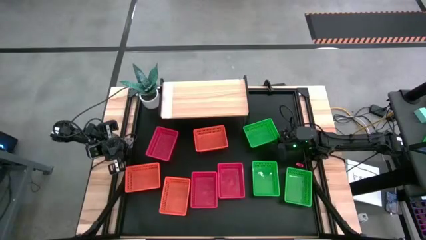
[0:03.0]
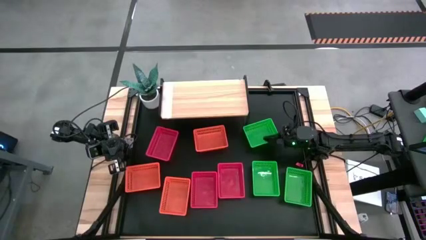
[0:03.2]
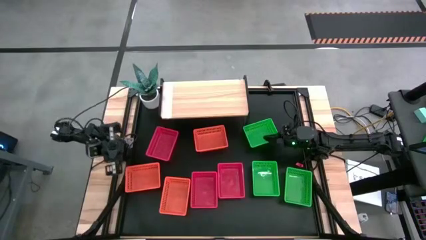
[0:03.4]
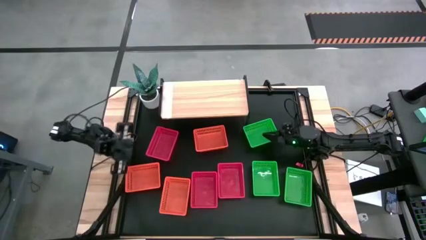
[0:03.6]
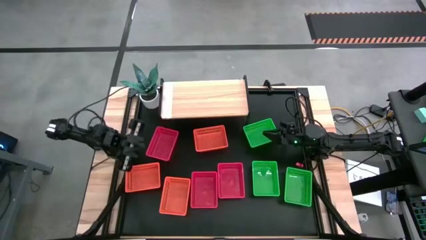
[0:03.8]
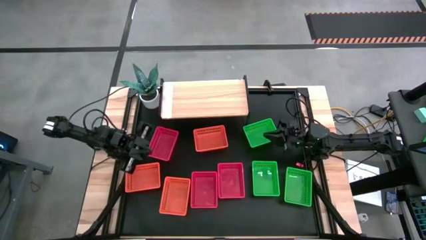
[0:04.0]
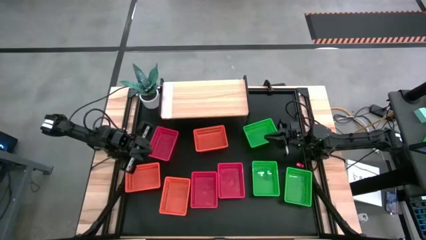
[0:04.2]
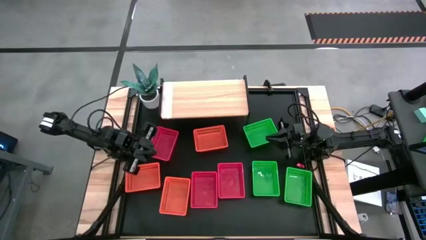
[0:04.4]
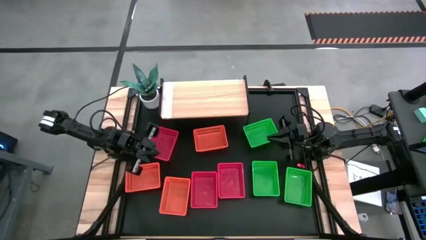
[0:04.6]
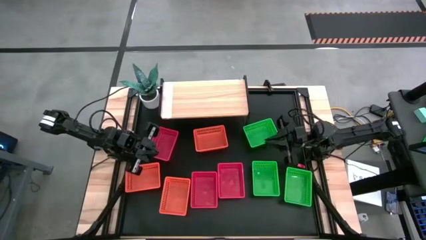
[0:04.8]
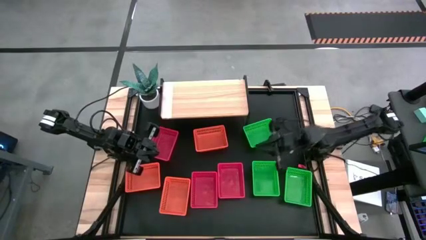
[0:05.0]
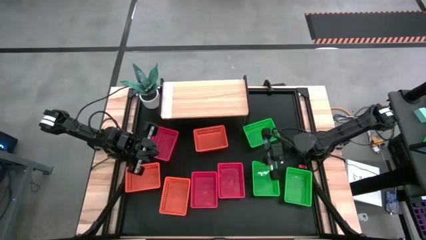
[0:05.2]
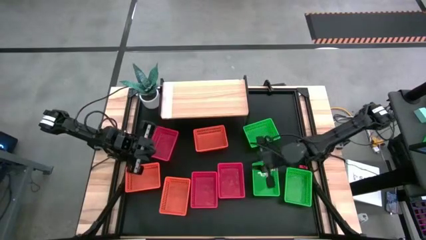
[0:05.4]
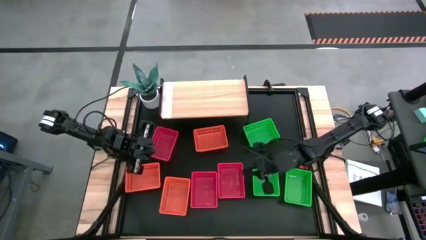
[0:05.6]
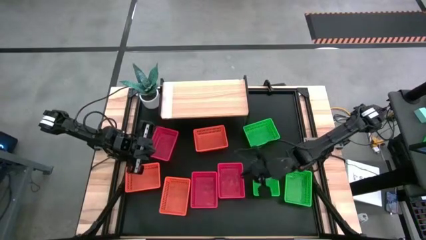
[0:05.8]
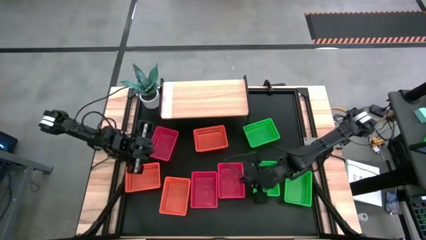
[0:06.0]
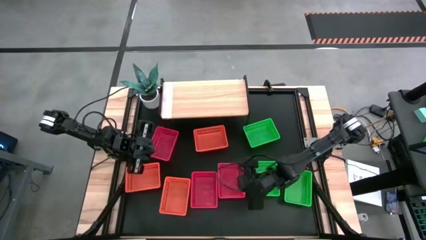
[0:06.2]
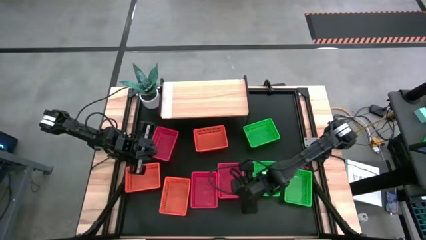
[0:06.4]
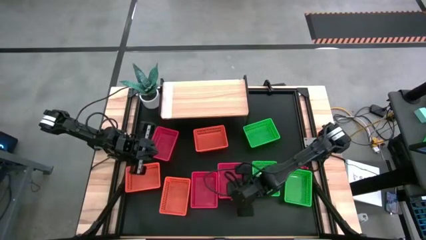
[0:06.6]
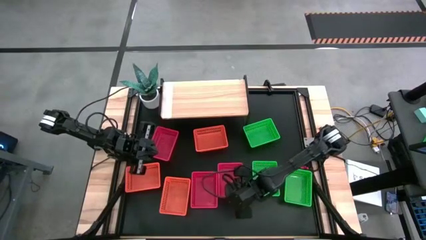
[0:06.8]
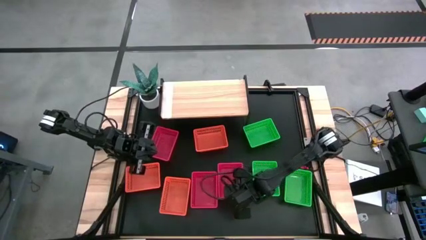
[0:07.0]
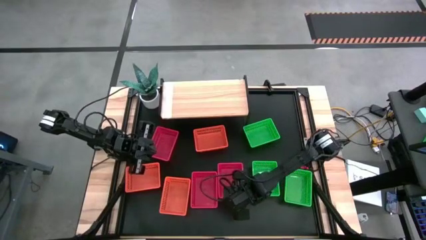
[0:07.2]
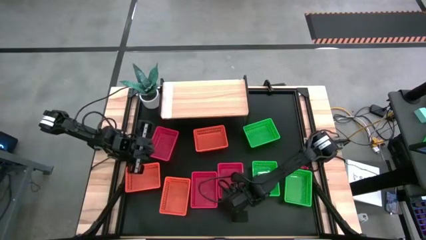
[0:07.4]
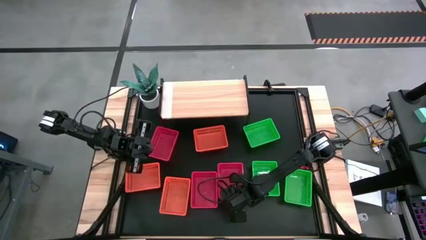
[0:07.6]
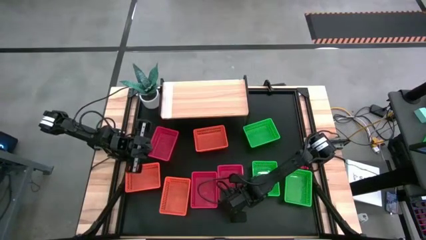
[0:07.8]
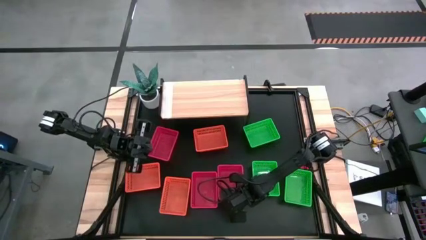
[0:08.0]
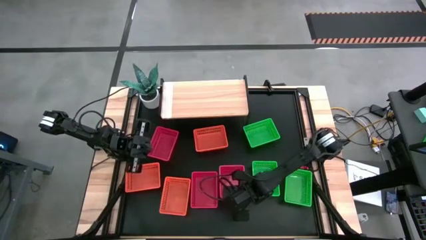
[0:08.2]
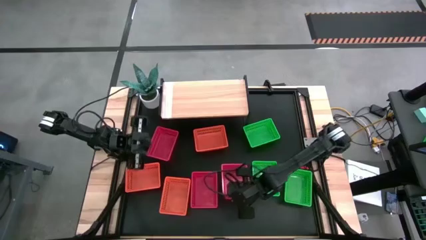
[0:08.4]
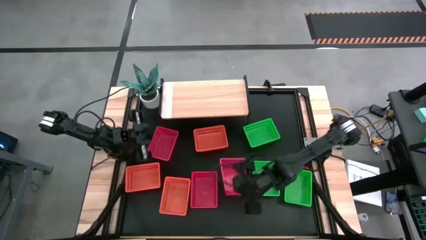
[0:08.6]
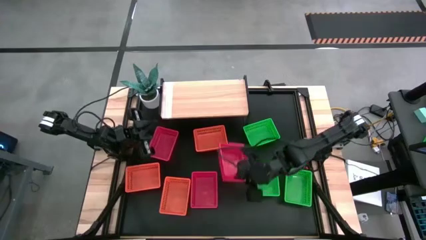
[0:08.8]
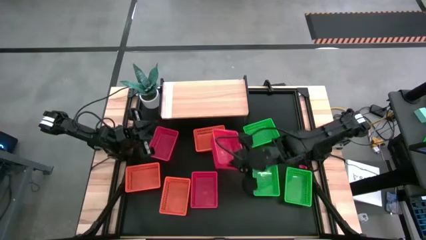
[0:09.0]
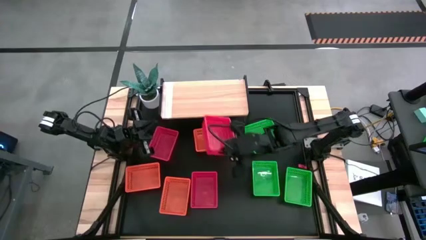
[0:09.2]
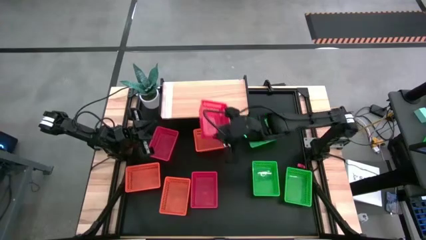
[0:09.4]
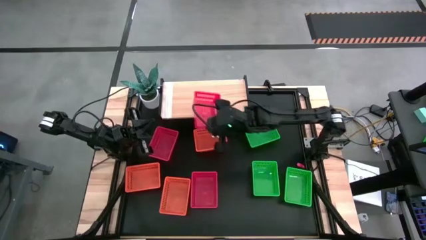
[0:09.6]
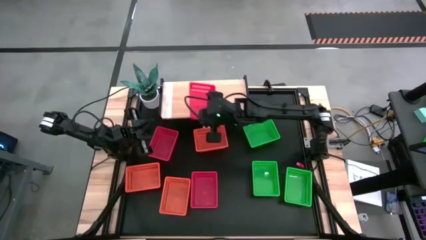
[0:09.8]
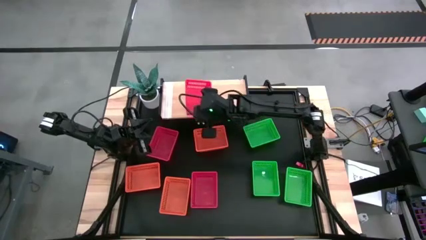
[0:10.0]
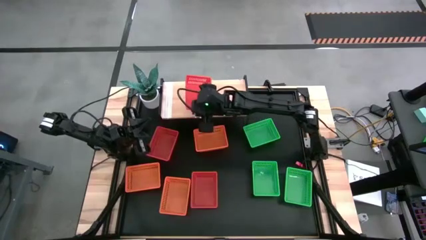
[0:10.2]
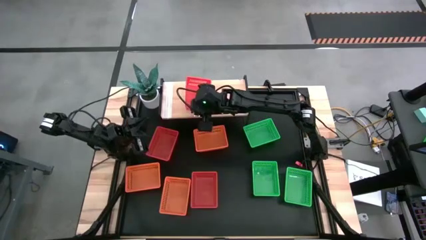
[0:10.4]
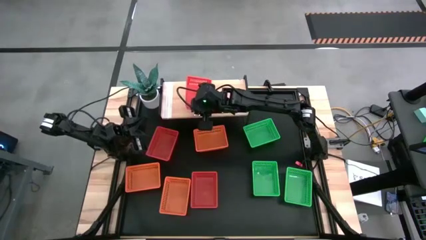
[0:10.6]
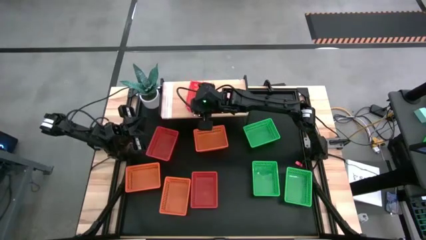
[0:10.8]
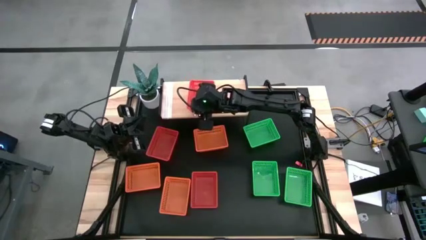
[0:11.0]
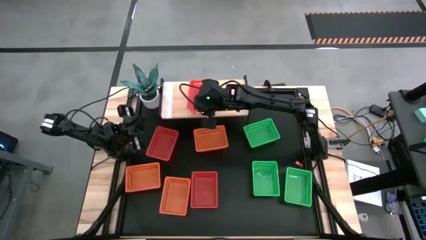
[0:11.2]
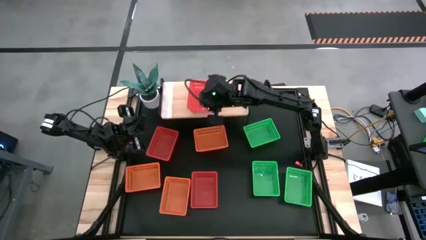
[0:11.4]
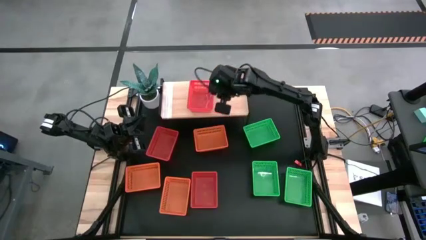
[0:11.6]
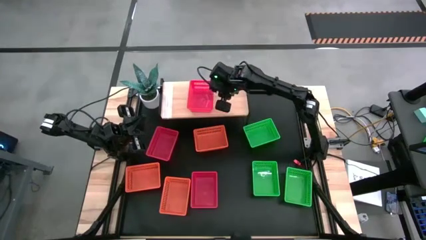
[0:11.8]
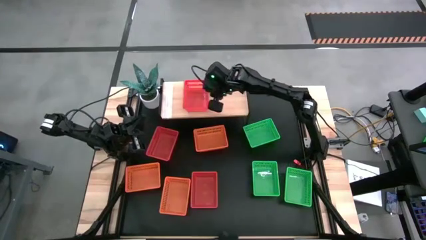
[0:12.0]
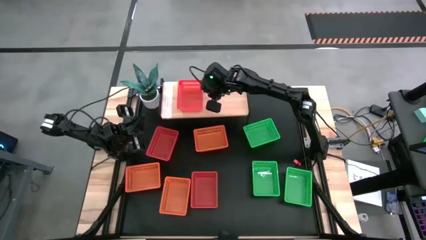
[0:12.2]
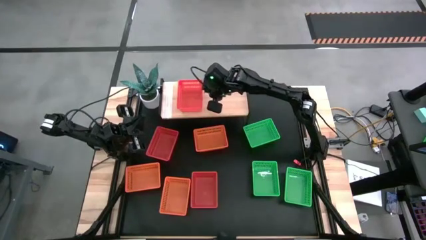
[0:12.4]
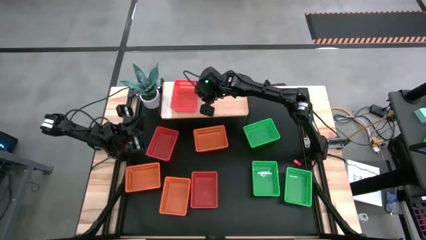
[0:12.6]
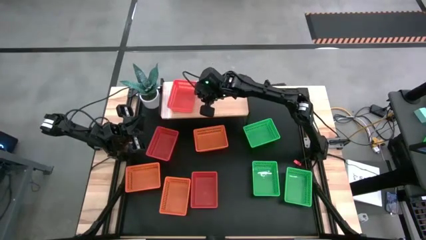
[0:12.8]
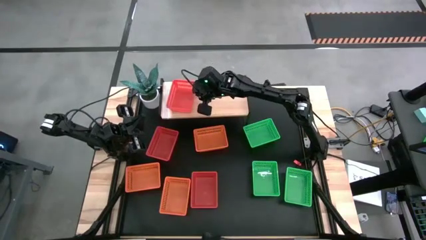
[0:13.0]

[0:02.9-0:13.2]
Put the bottom right red basket on the shelf

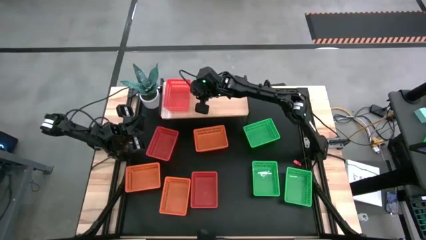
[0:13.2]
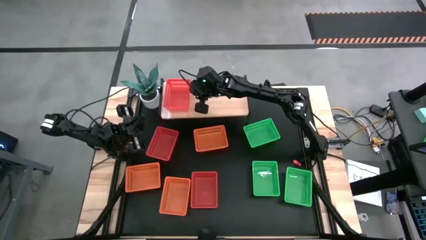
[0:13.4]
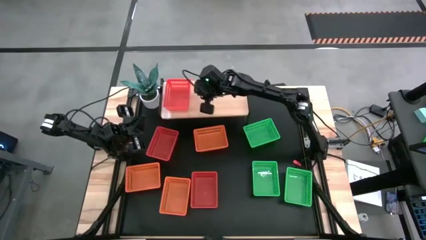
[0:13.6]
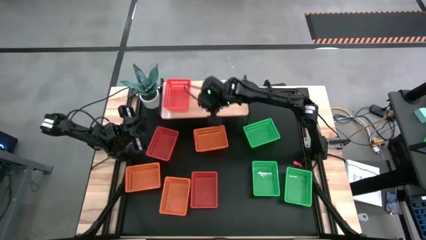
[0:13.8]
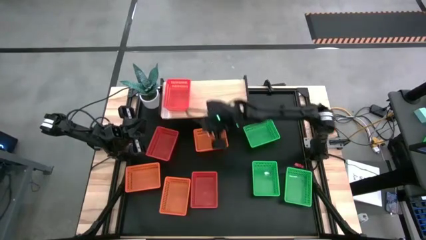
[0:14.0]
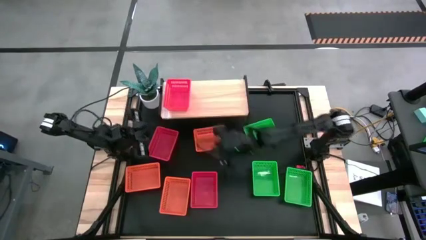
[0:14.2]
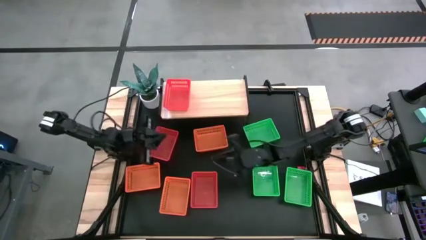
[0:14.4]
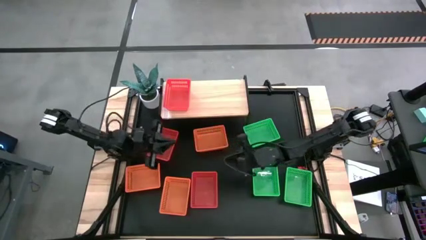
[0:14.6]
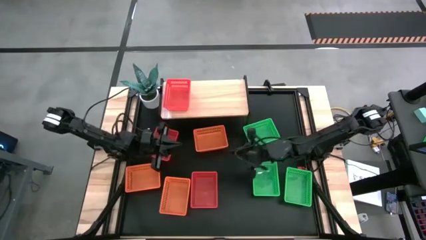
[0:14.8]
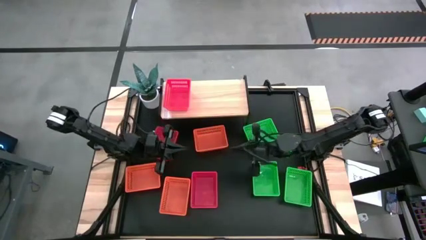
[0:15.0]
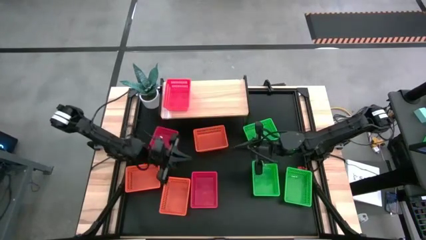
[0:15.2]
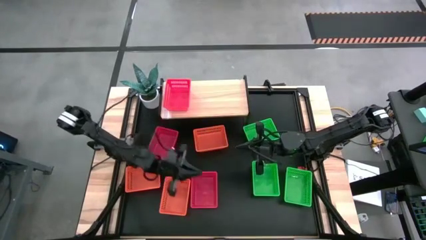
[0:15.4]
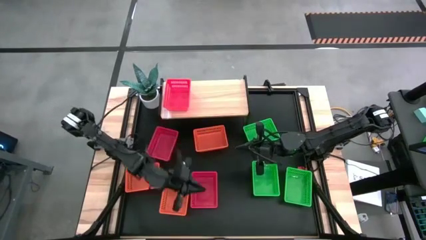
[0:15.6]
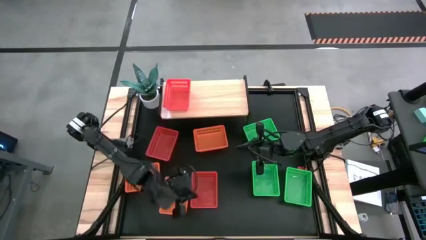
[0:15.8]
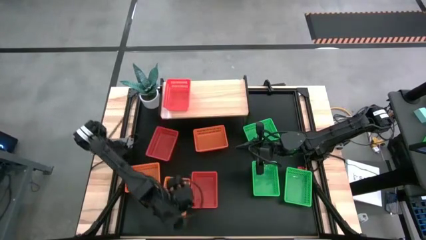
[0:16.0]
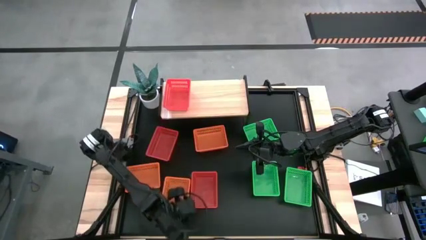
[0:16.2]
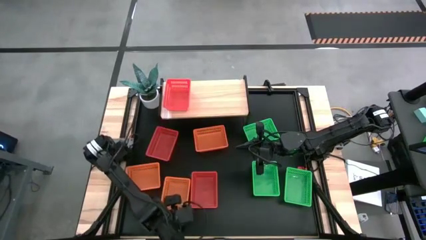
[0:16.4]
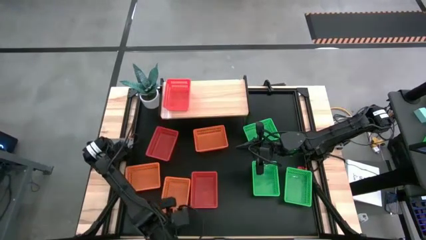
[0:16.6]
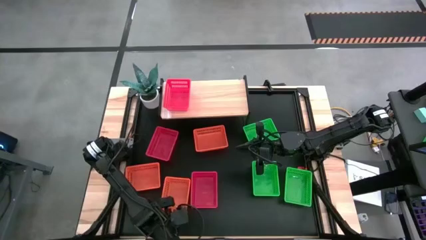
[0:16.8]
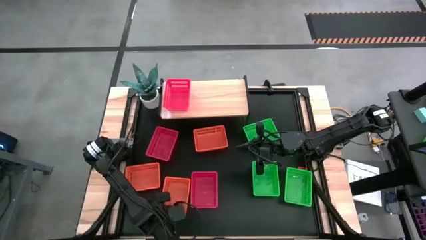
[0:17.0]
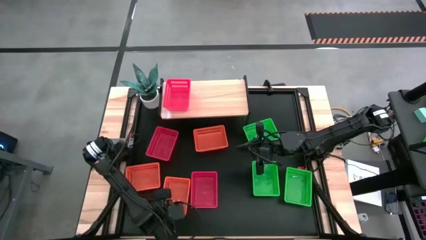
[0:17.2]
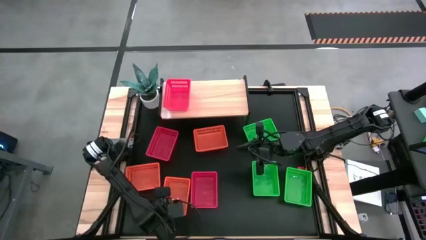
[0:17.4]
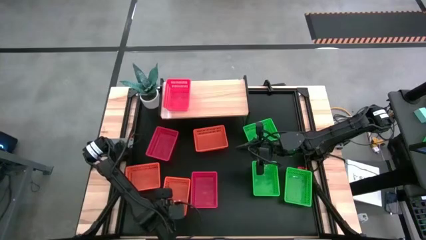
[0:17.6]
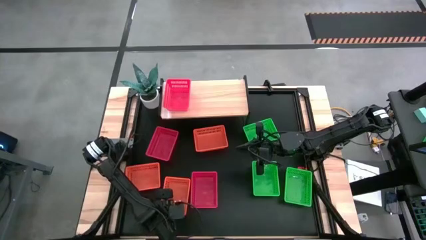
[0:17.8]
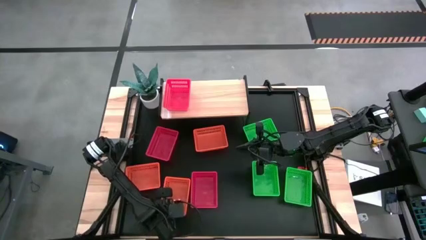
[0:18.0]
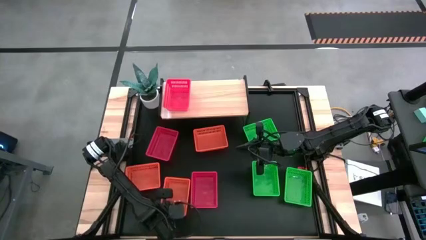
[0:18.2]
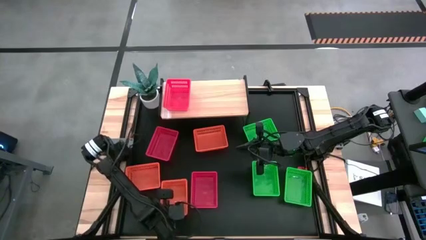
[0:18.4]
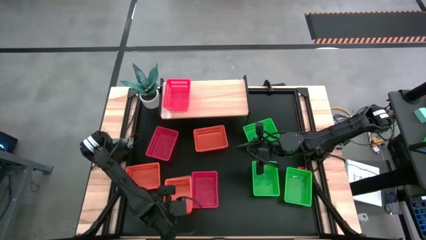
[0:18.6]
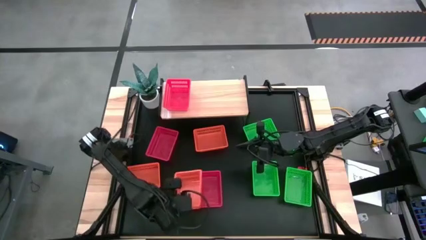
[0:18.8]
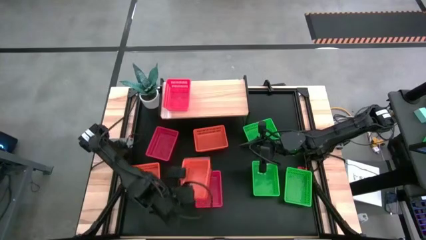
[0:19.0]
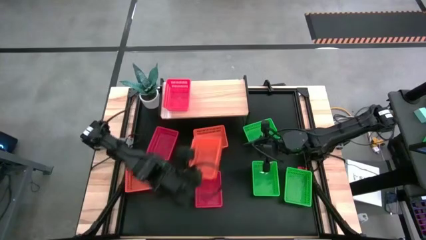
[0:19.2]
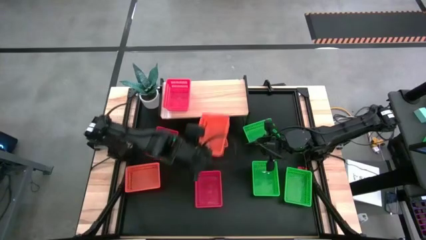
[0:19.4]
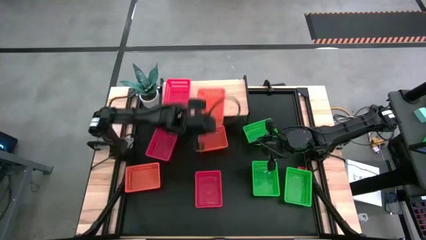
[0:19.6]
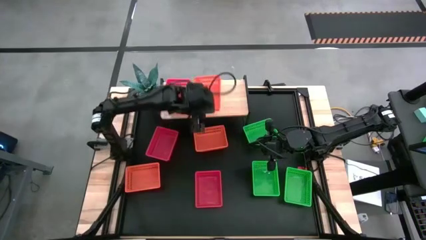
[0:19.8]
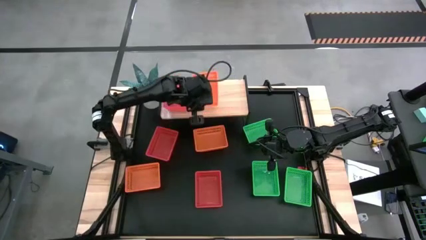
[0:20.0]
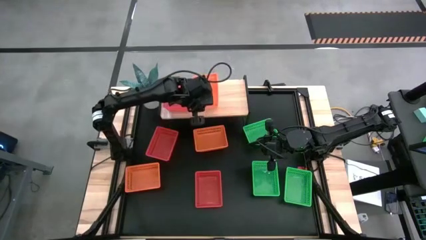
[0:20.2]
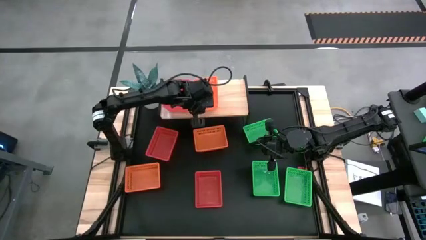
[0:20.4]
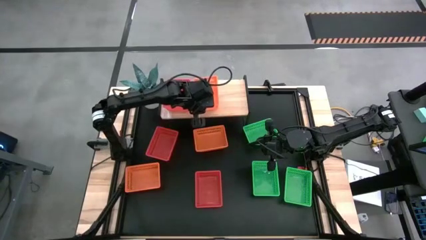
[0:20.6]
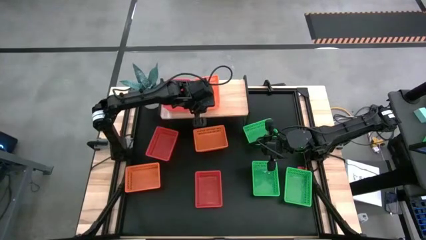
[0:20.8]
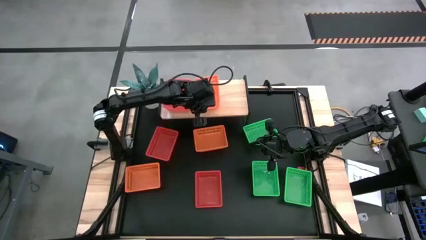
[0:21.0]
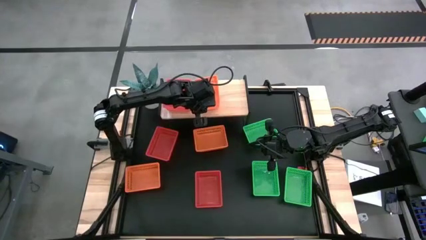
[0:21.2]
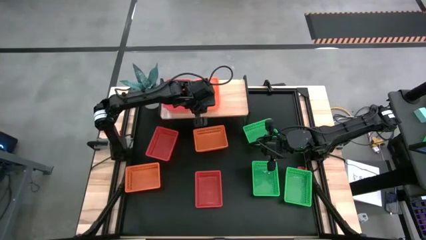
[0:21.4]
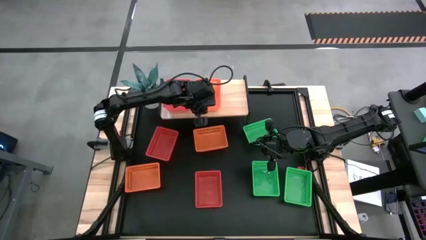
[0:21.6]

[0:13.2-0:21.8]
Put the bottom right orange basket on the shelf
